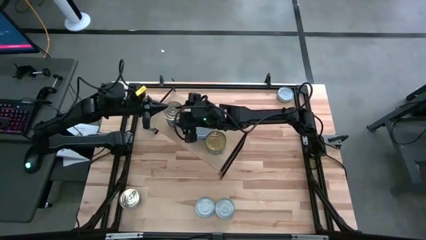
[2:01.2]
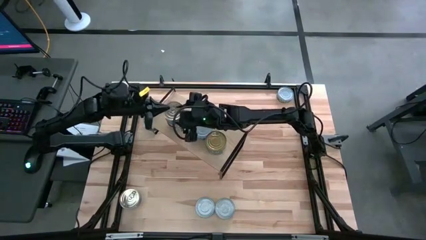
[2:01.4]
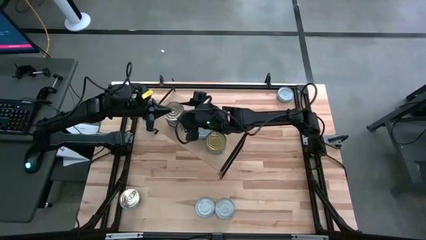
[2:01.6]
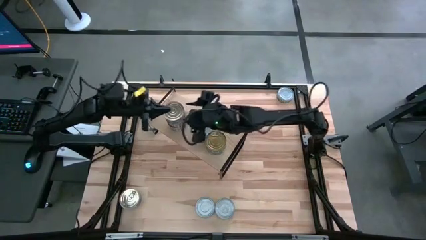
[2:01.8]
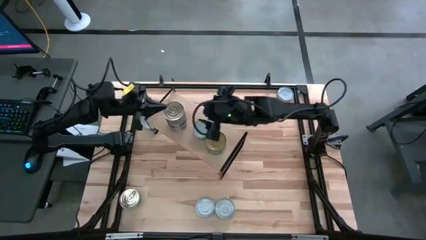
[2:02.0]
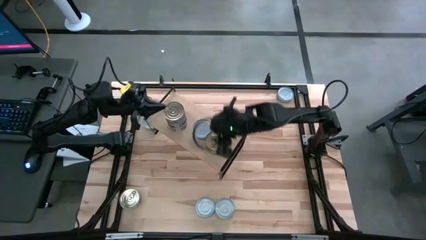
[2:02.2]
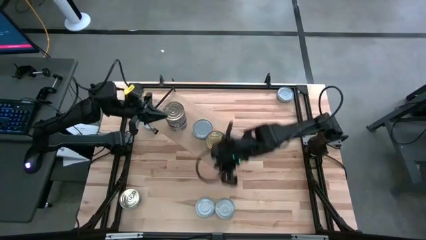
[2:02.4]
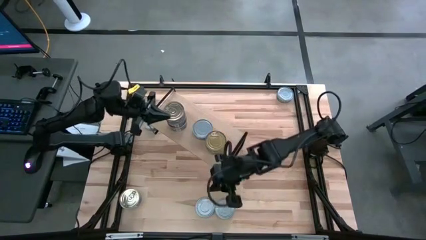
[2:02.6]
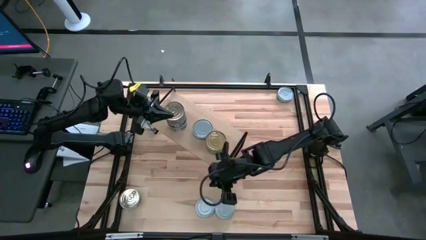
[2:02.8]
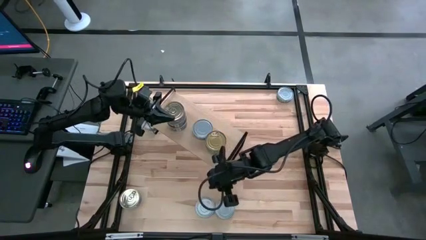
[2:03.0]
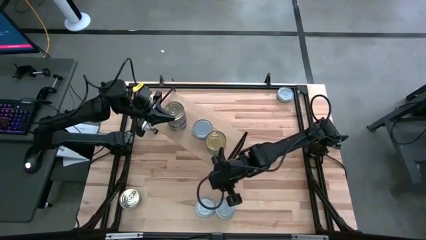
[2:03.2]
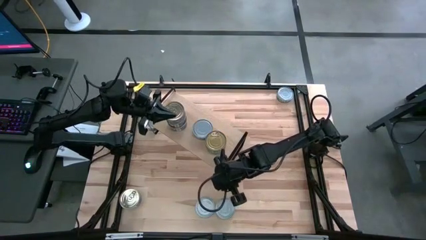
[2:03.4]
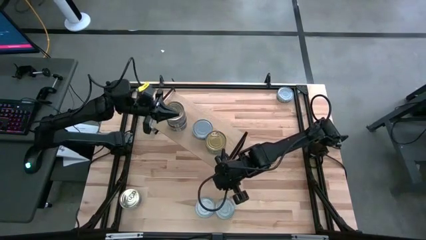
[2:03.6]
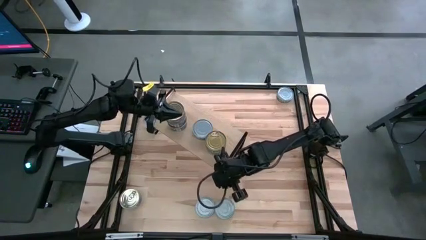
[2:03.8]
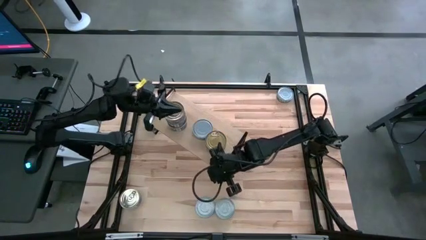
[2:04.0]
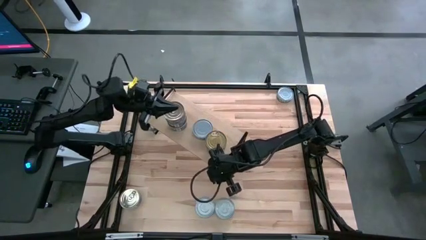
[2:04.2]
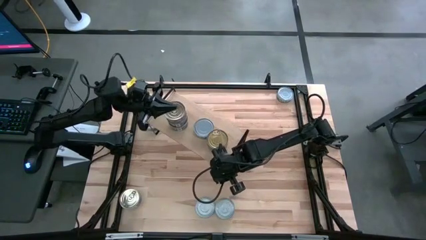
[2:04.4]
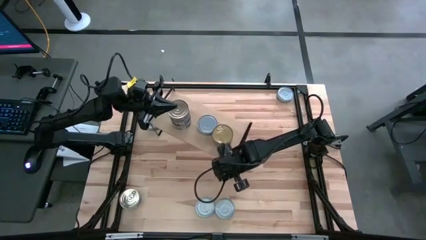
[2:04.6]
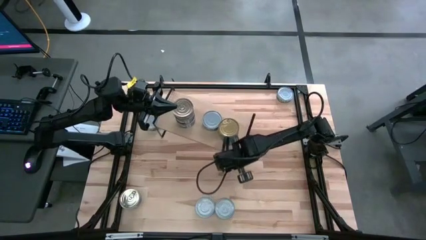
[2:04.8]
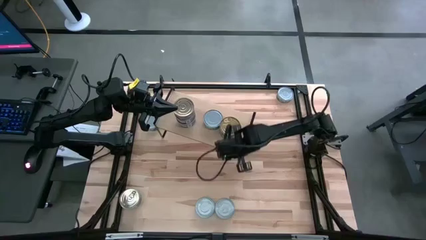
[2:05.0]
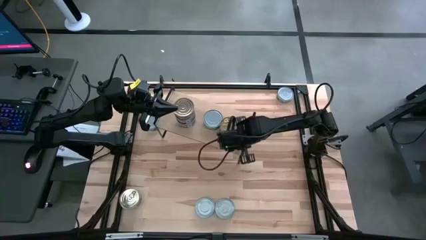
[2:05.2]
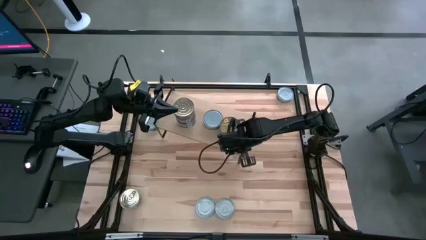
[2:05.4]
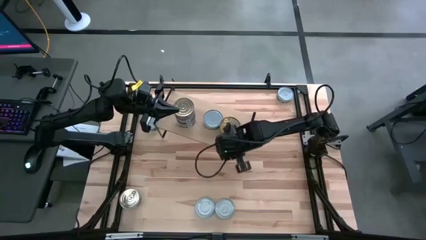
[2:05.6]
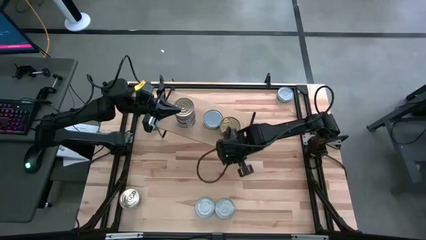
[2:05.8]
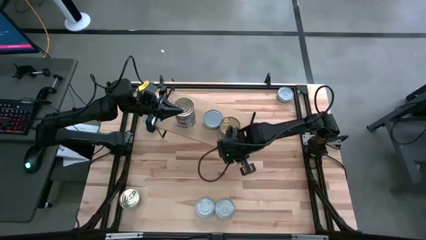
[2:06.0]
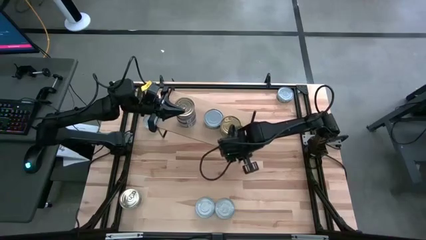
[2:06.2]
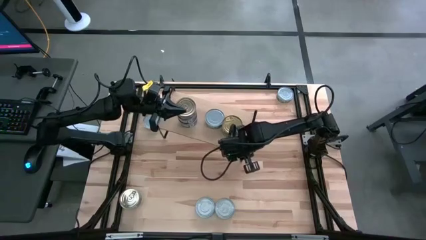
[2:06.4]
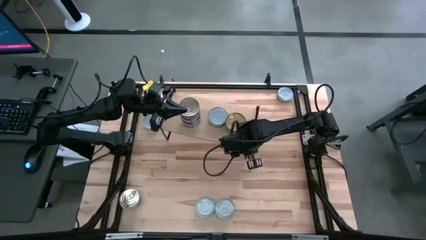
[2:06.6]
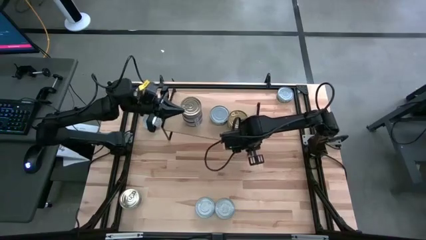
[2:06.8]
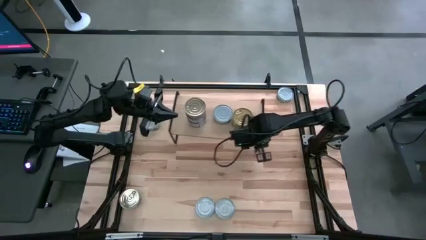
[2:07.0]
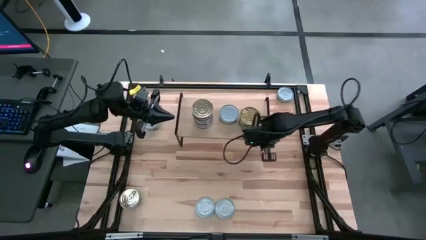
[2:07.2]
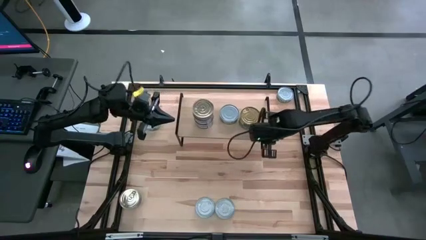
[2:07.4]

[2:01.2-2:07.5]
Task: Stack canned seafood by type on shelf
Adjust the shelf

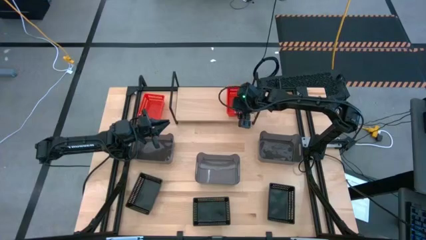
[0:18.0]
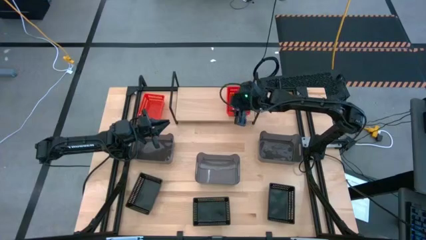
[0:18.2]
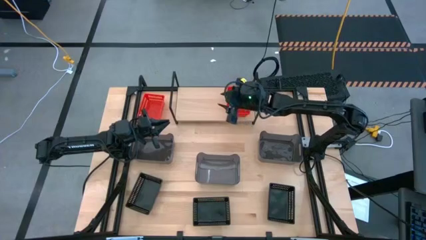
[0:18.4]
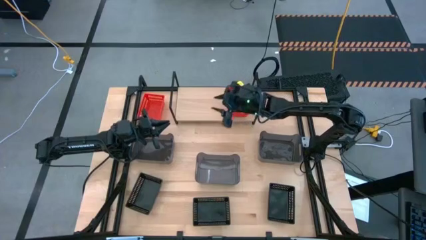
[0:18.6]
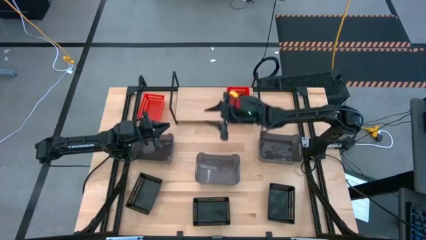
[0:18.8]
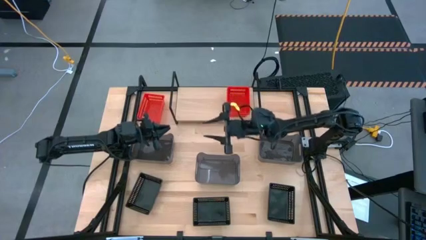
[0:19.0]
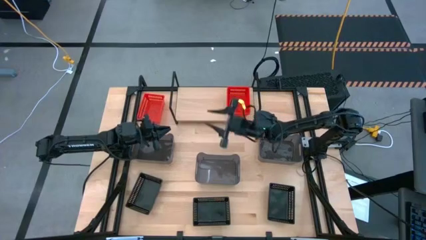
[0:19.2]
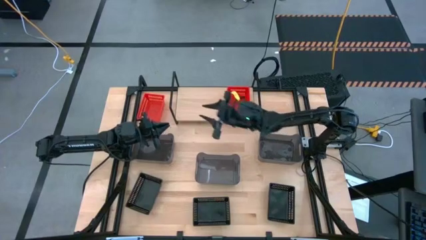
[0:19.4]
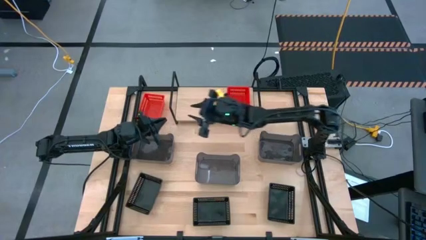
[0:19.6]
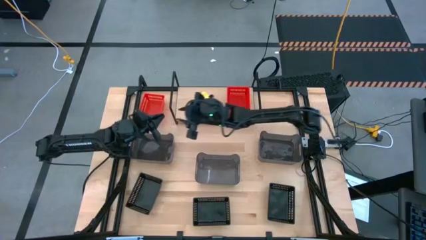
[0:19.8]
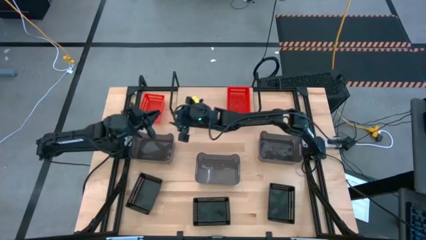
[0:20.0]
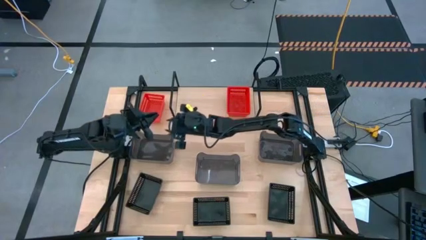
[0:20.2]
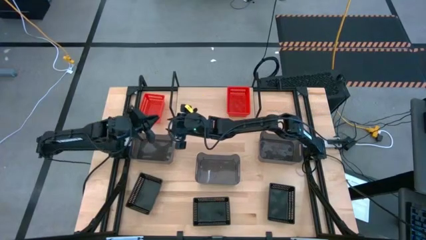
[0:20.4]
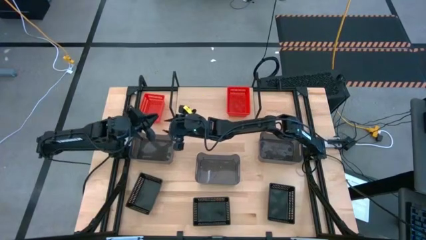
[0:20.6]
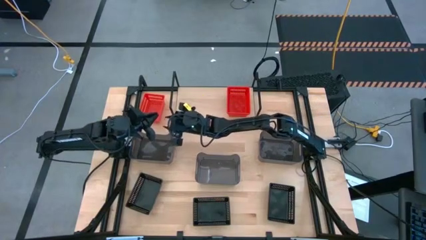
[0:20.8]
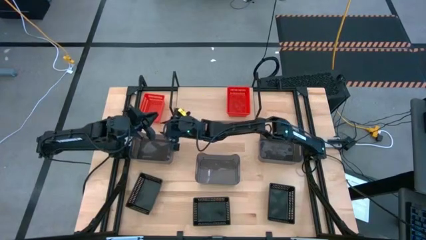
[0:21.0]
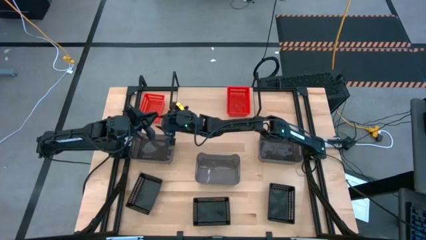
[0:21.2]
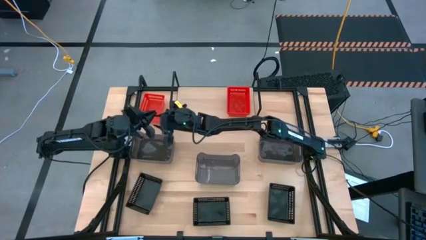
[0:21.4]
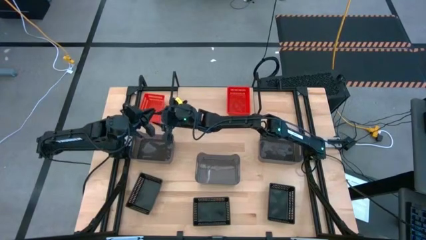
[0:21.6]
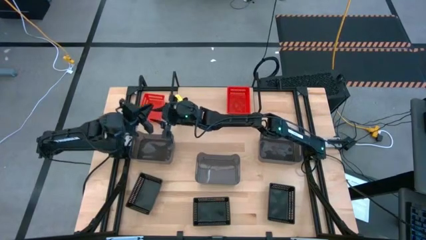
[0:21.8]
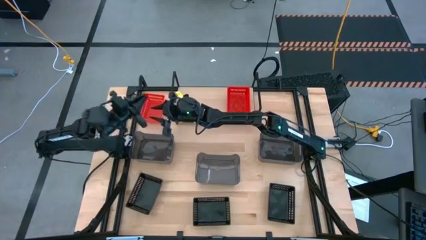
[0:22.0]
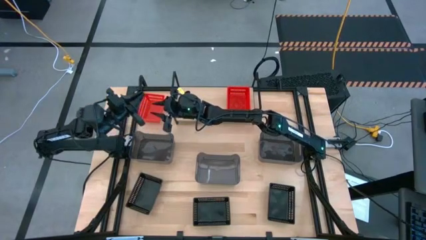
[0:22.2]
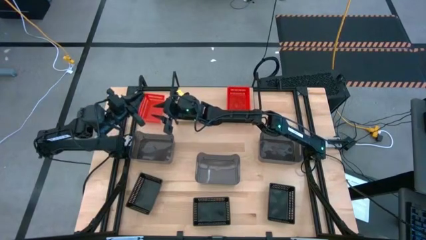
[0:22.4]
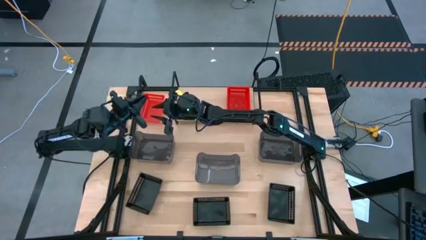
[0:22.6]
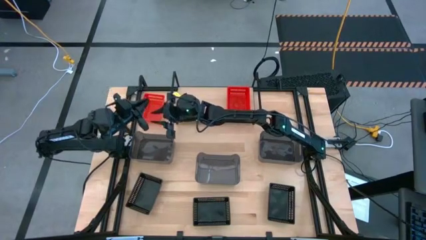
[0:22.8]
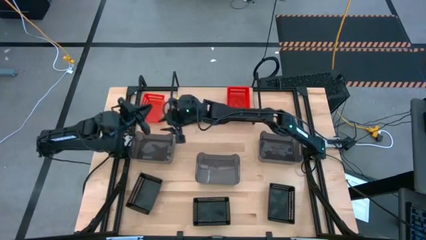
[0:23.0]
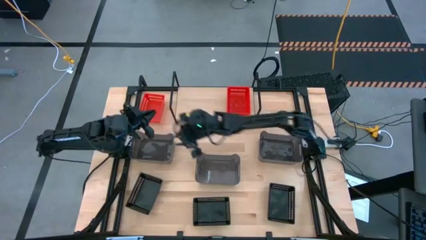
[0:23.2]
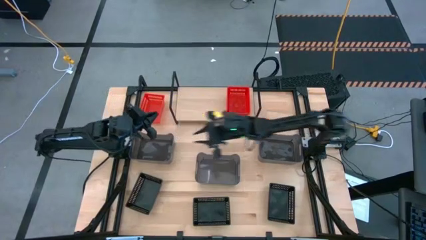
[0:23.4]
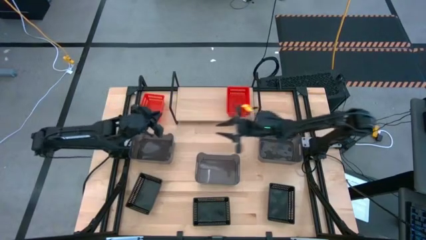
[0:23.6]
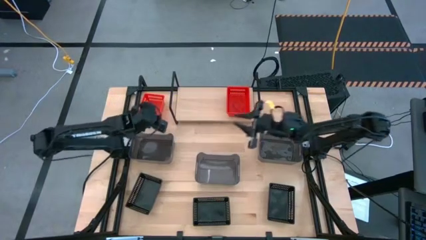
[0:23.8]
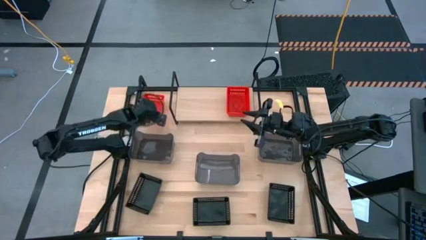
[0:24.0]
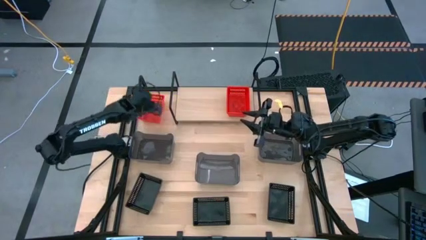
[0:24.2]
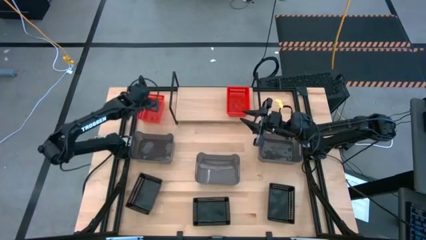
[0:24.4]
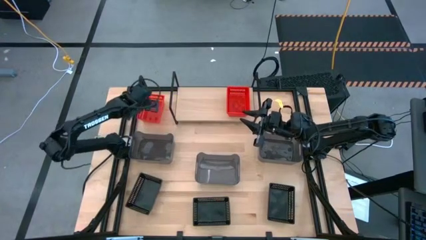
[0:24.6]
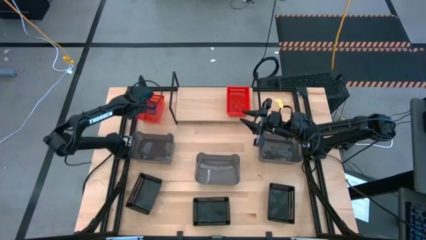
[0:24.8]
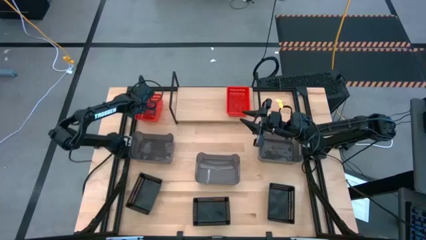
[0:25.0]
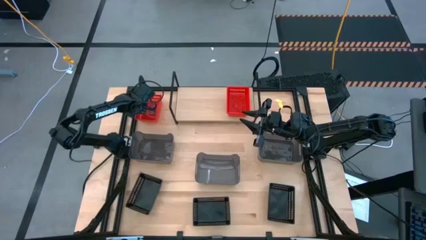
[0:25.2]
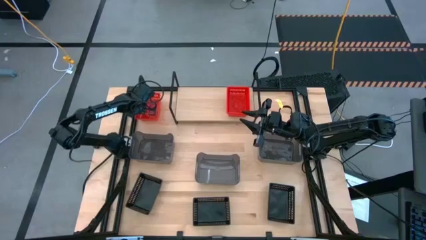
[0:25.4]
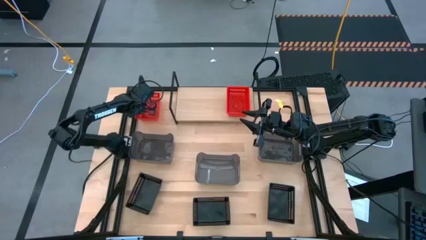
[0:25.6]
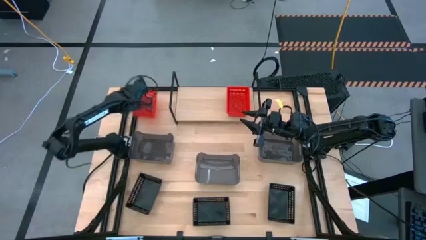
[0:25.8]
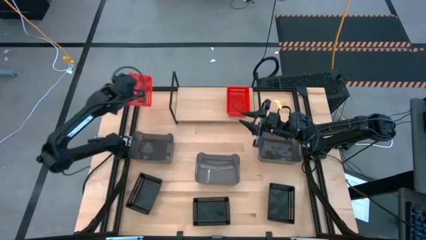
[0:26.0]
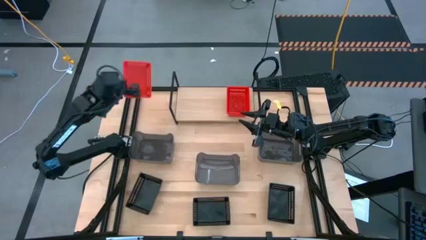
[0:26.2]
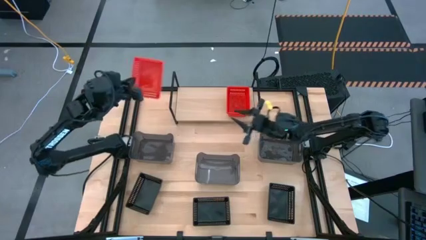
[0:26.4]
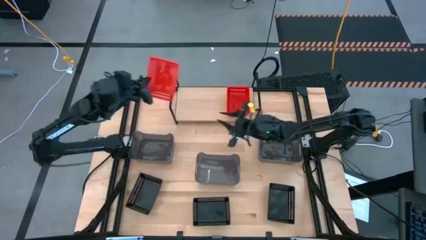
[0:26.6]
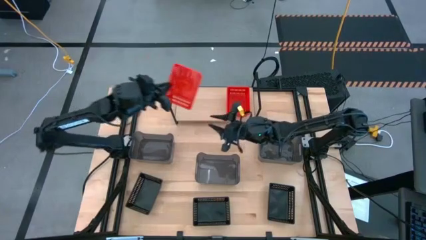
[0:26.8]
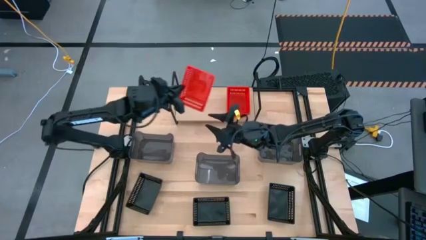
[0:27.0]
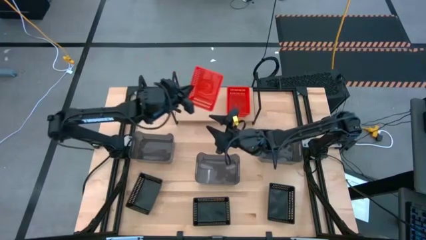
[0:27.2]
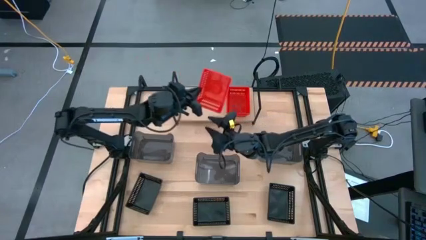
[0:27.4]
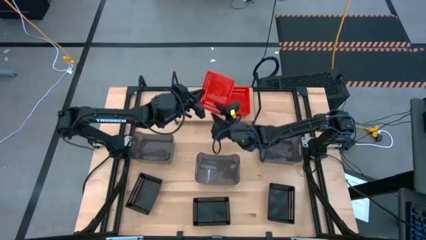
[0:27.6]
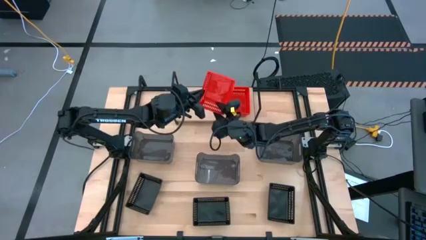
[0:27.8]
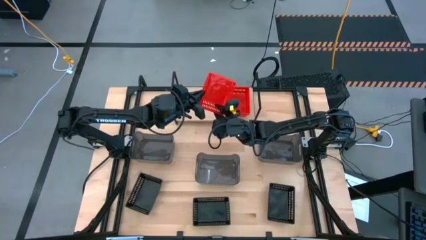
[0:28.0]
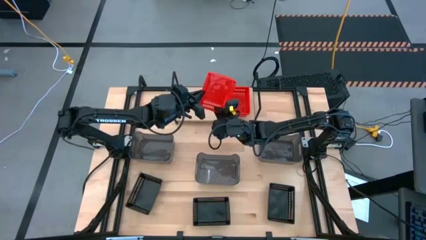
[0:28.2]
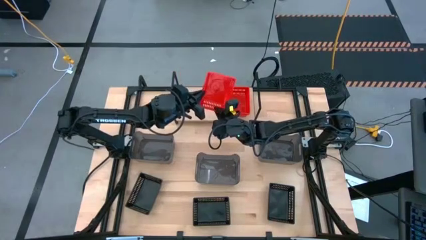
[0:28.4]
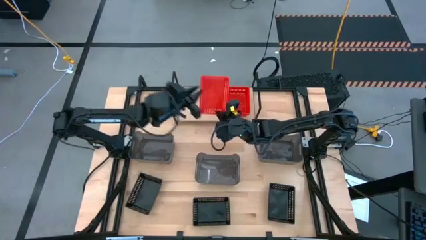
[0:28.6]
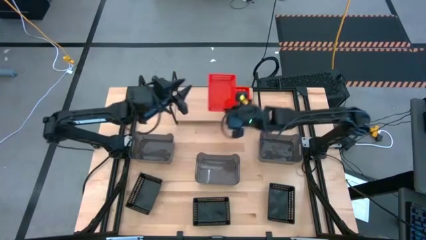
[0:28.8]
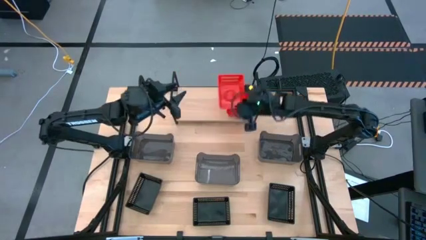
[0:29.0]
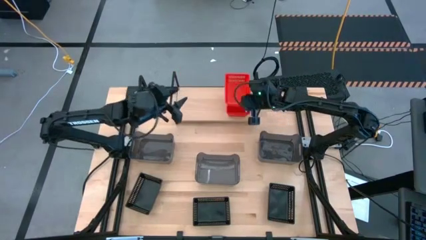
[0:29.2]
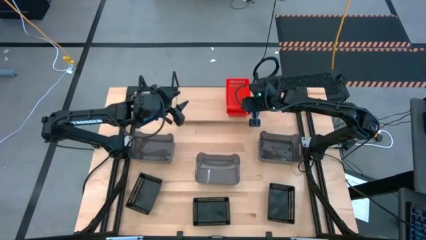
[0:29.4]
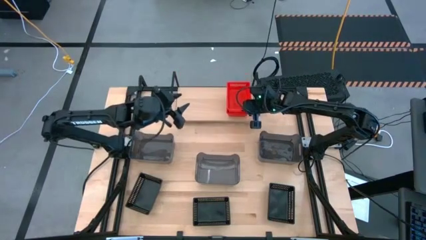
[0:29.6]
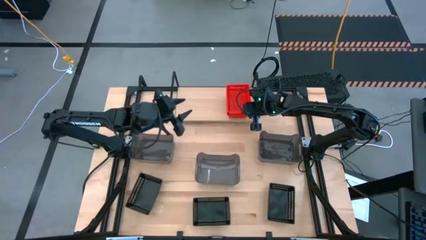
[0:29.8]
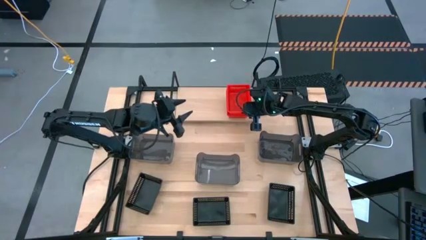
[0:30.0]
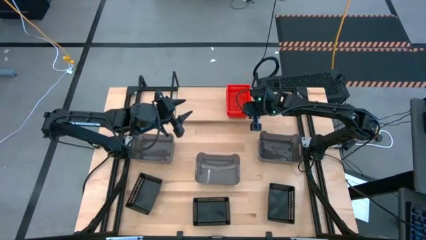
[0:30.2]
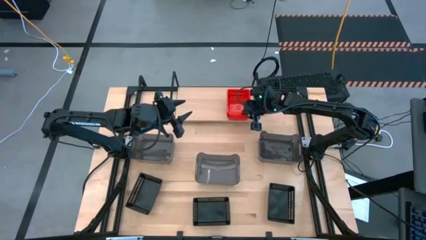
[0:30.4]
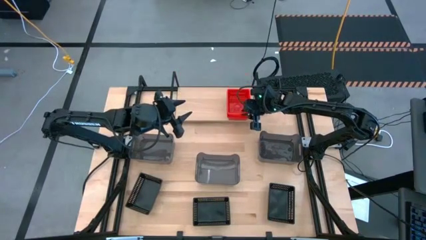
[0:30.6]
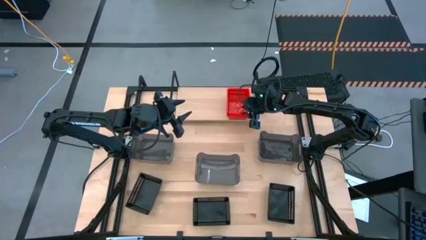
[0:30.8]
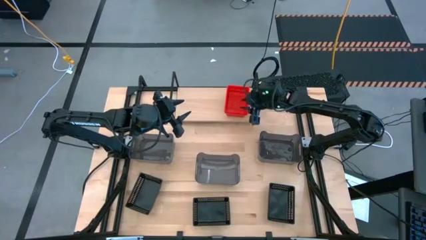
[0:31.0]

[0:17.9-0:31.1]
Task: Stack baskets on shelf by color
Stack the red bin on top of the other red bins on the shelf
